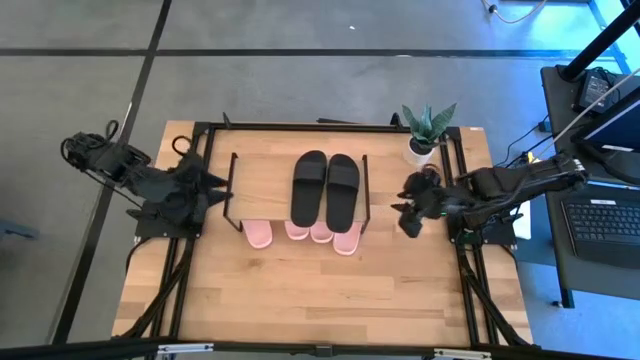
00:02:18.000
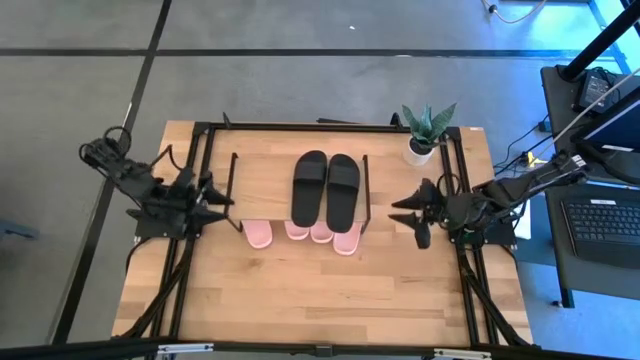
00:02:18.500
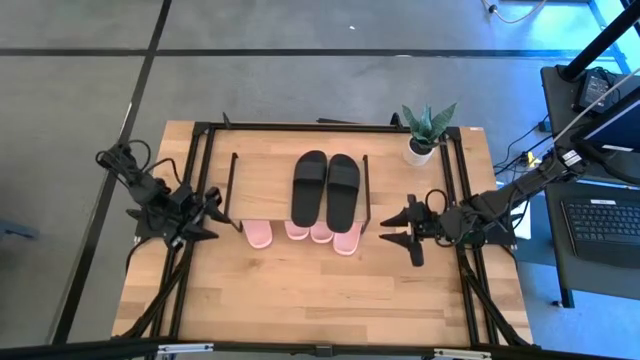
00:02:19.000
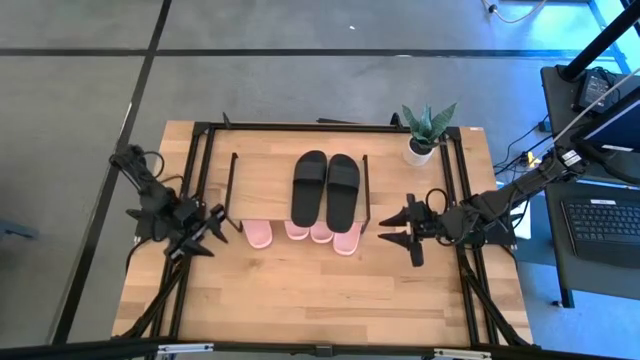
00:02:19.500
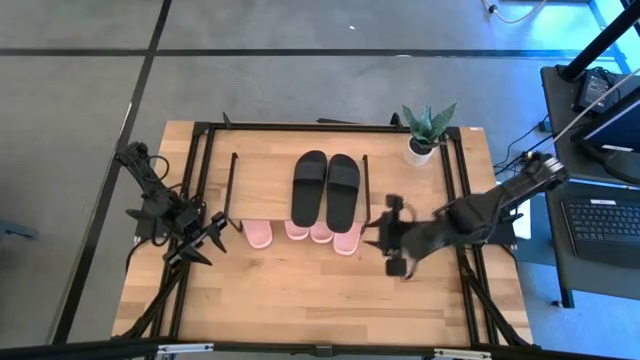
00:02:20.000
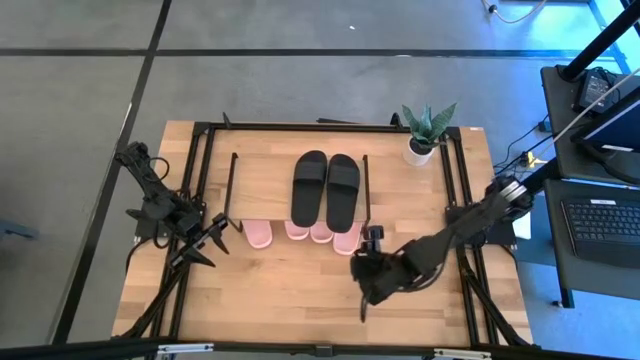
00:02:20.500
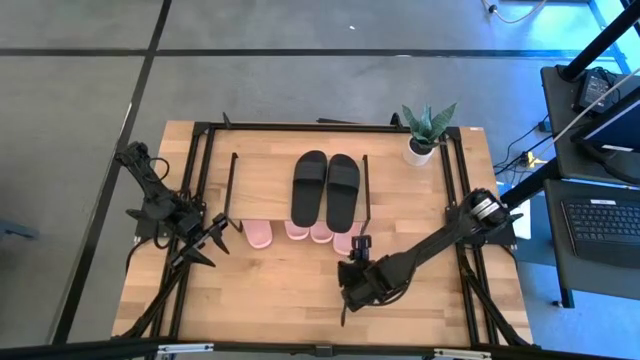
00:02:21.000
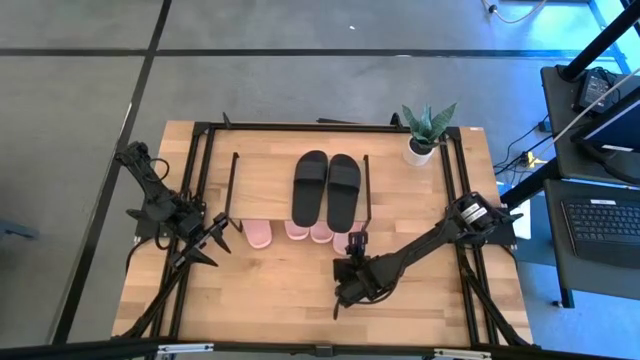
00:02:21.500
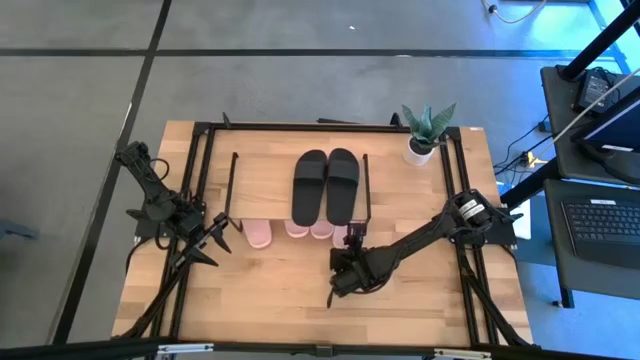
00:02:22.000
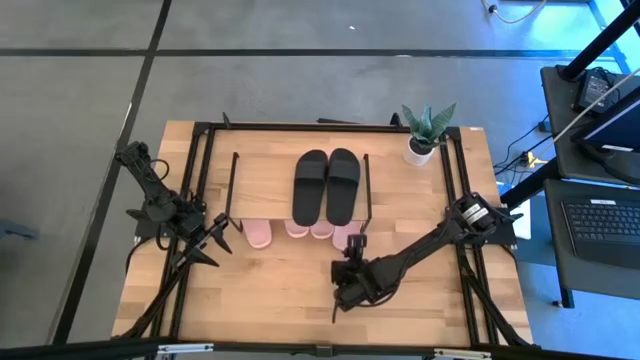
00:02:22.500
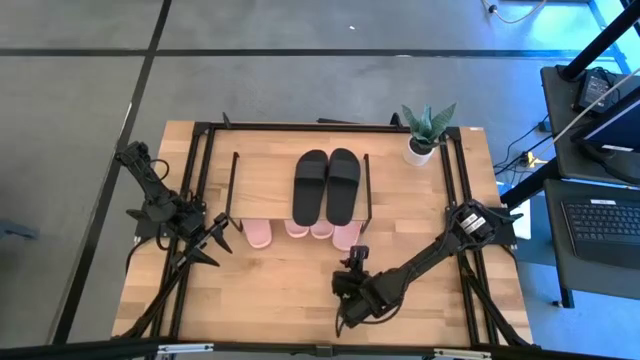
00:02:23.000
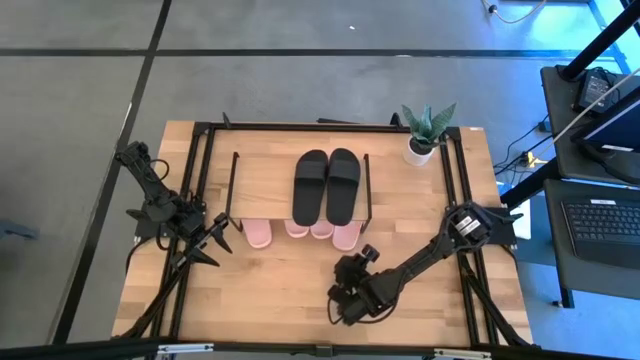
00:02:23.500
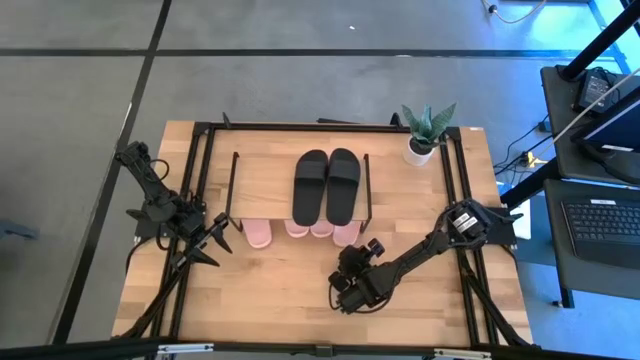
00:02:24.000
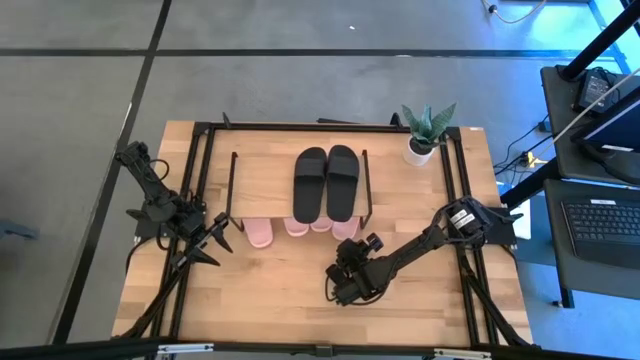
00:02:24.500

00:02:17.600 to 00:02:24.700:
Task: Pick and place slides into the shelf
Adjust the pink slides under the shelf

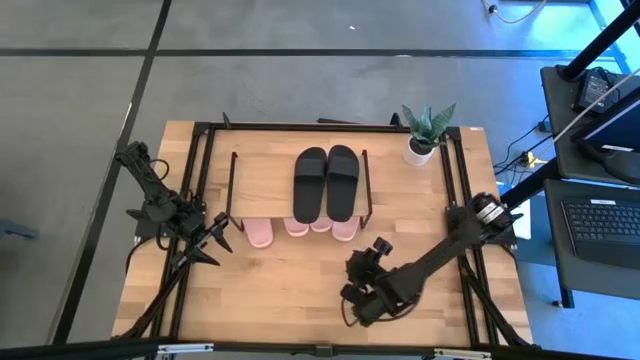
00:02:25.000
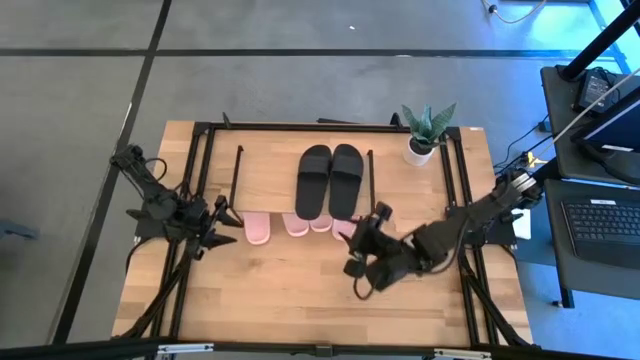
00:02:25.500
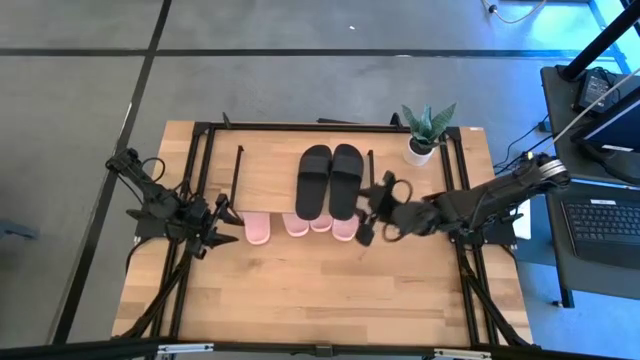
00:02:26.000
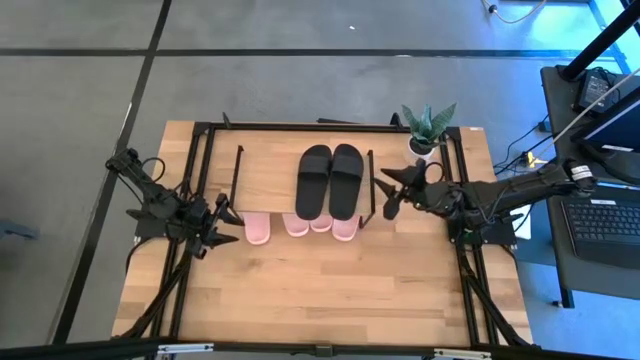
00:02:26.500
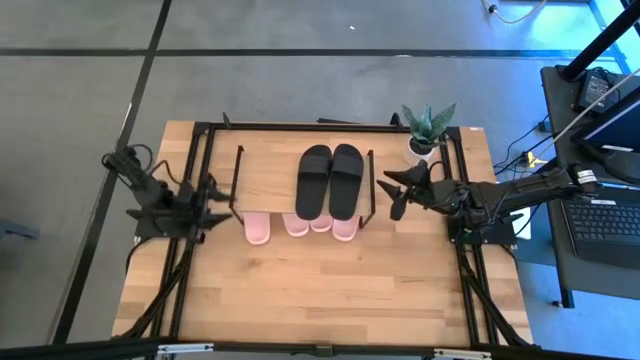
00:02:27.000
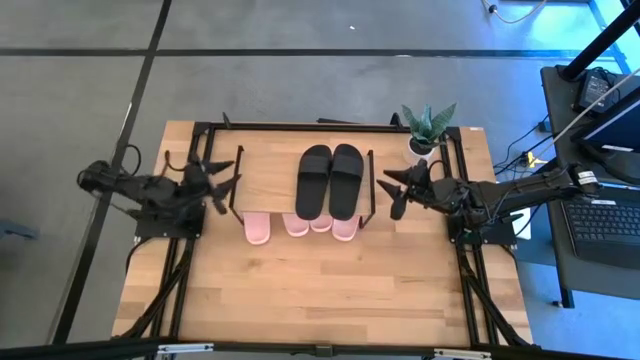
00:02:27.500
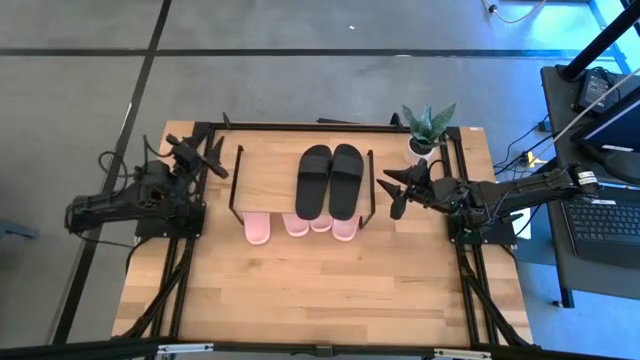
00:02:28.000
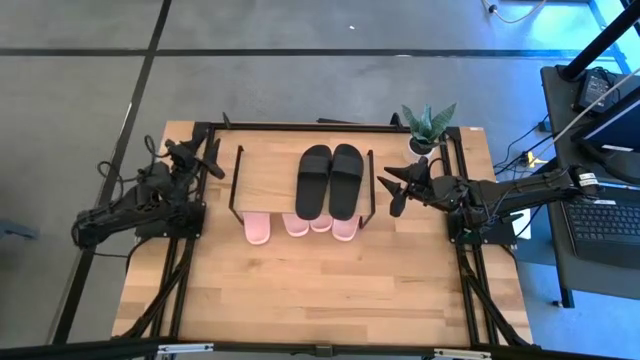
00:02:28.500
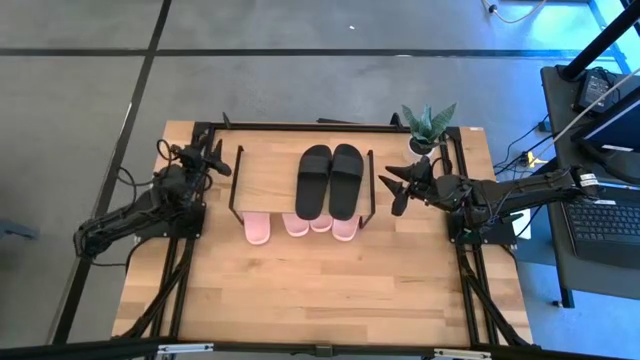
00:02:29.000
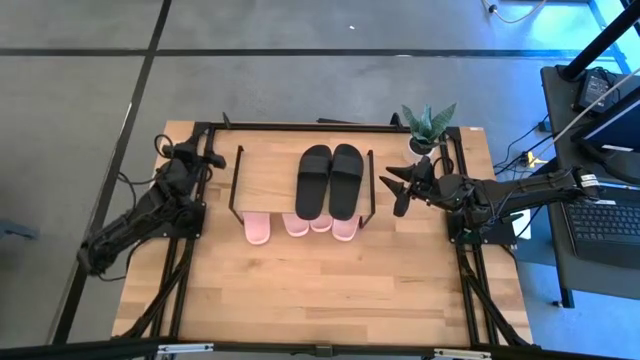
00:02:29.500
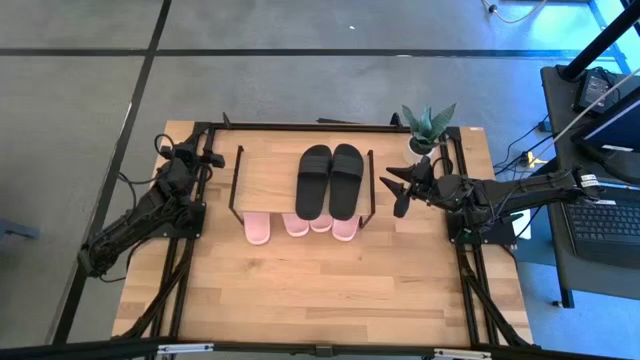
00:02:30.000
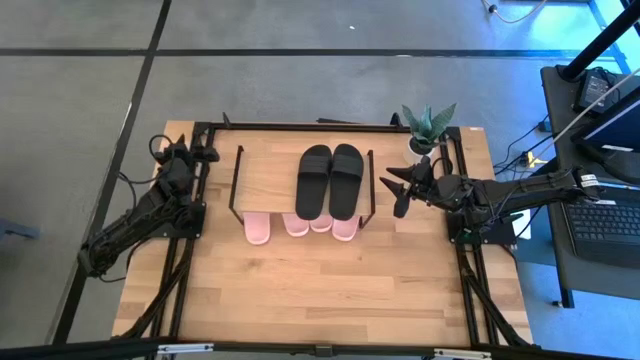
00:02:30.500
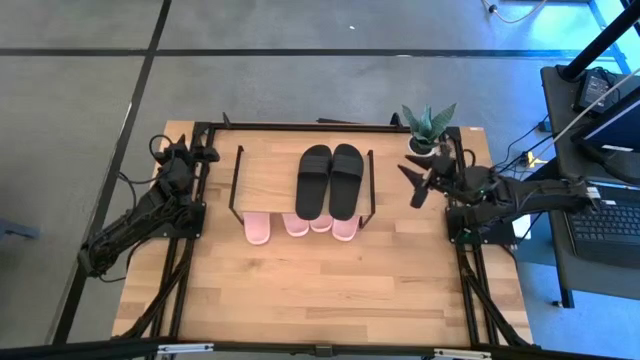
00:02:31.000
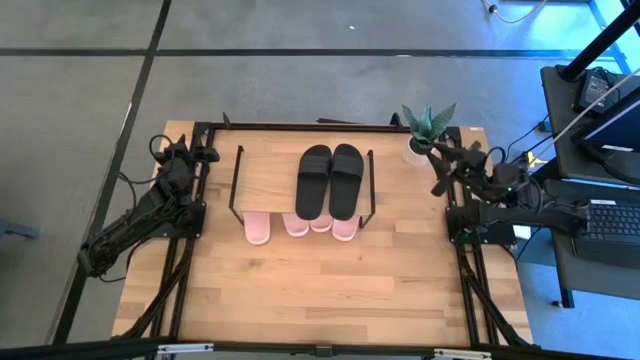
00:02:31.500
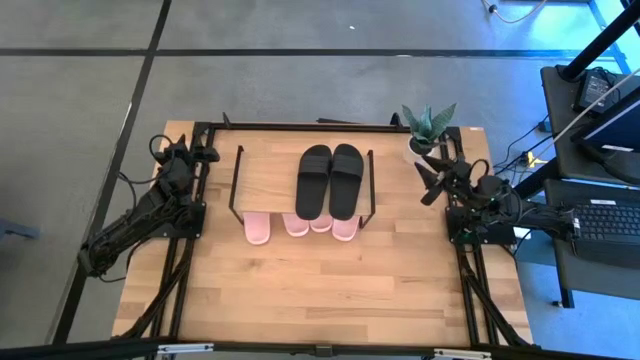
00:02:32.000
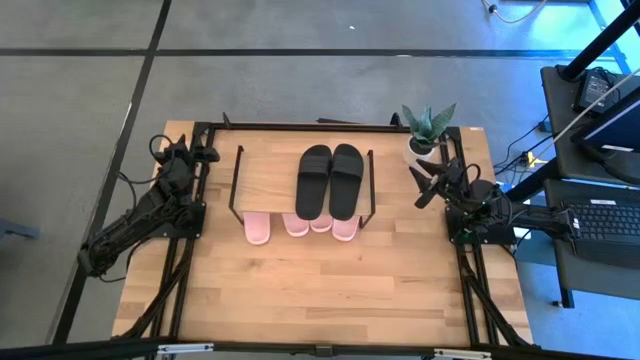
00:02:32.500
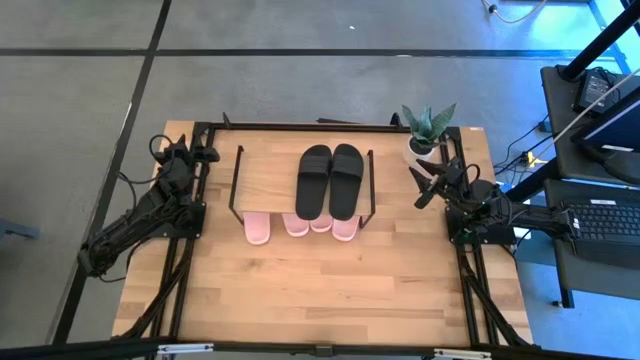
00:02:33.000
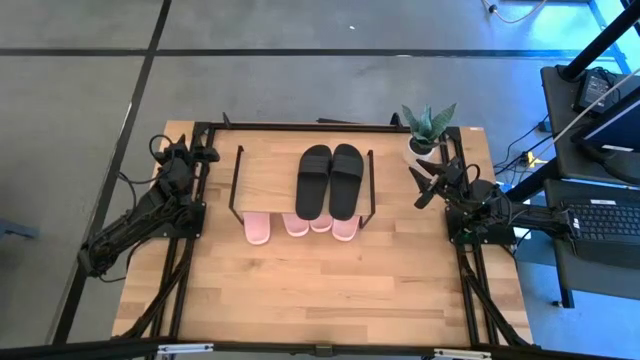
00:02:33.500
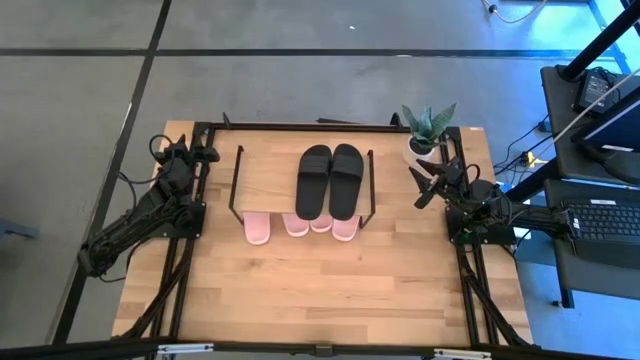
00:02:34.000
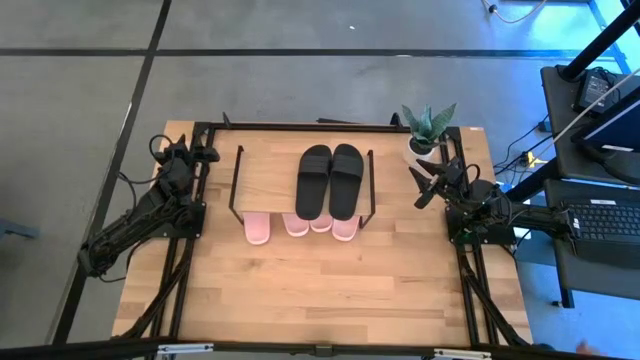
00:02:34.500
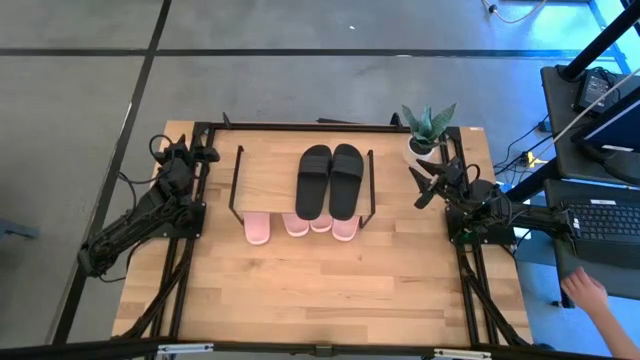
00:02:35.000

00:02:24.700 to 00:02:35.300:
Return to Home Position

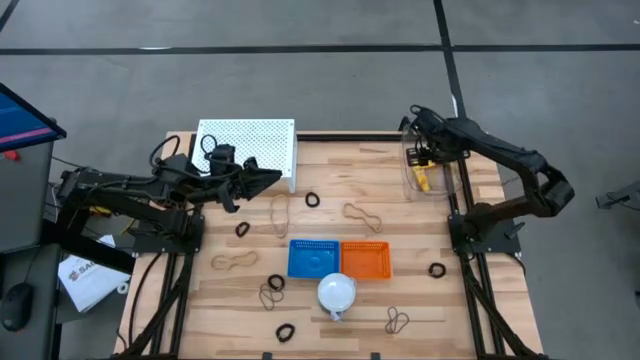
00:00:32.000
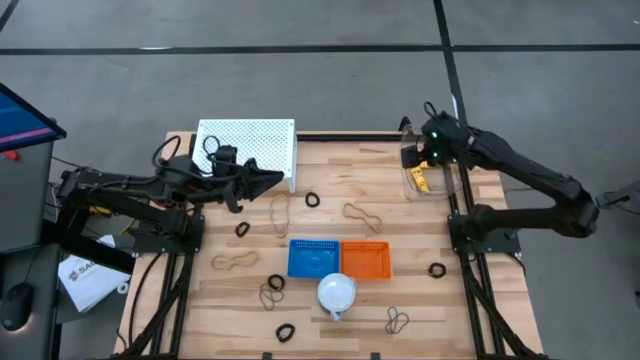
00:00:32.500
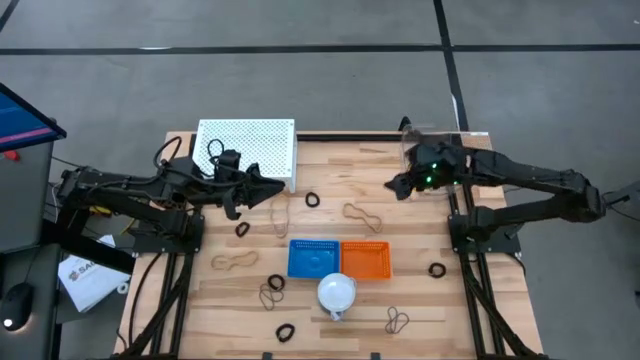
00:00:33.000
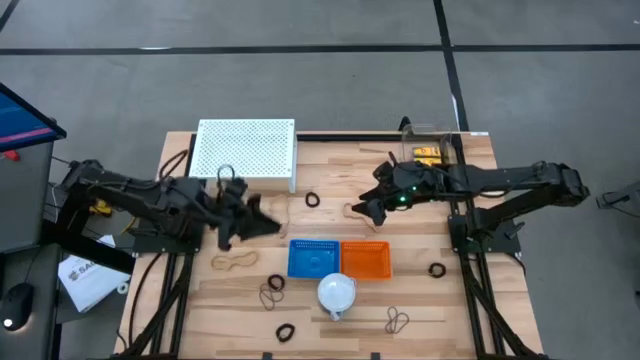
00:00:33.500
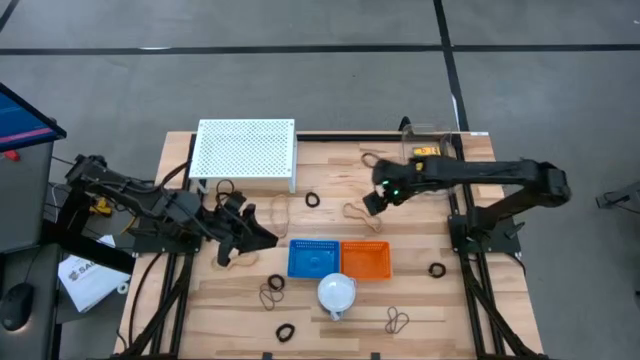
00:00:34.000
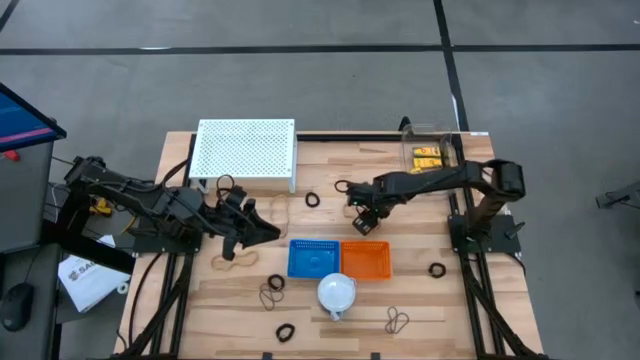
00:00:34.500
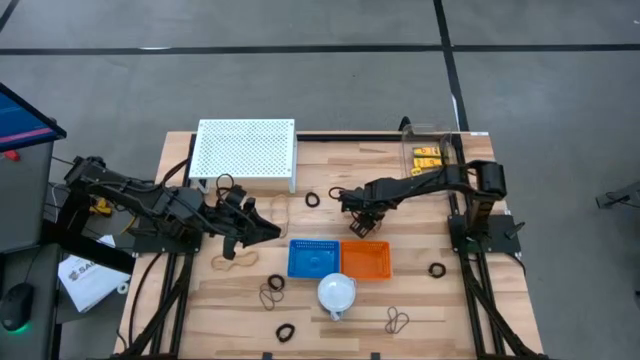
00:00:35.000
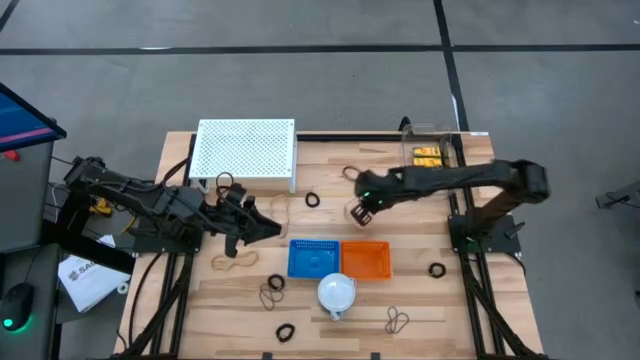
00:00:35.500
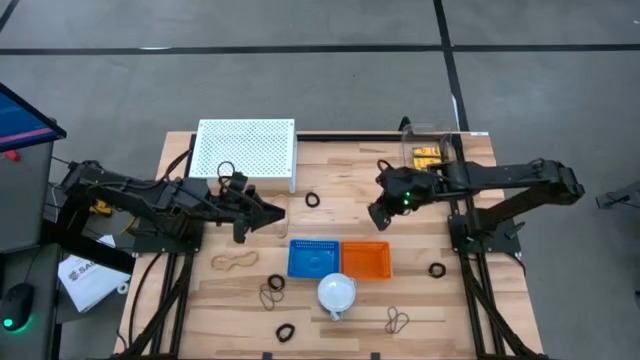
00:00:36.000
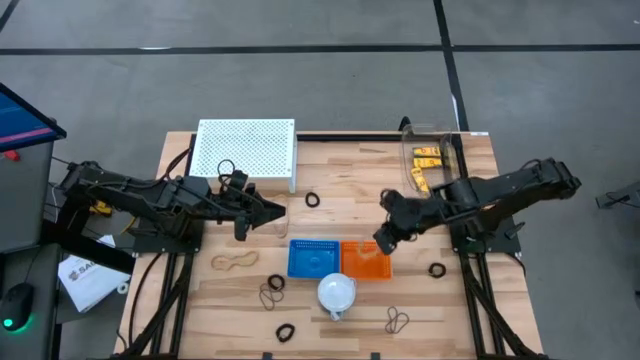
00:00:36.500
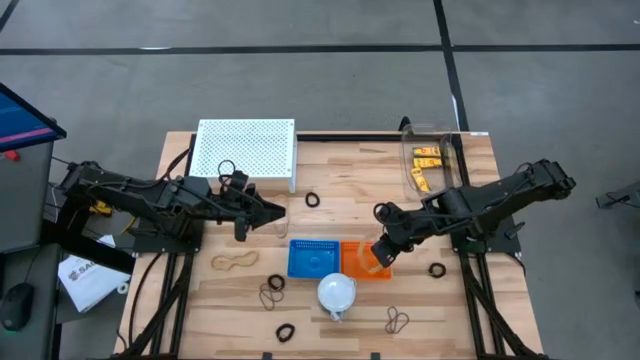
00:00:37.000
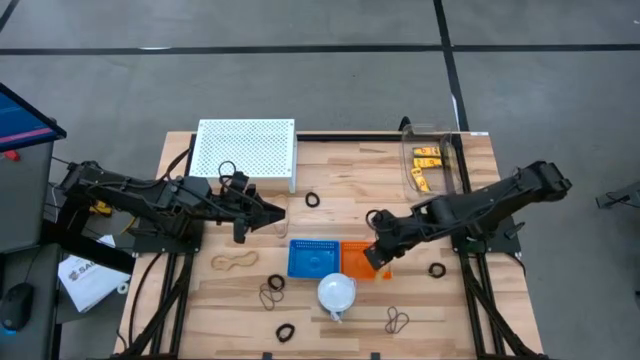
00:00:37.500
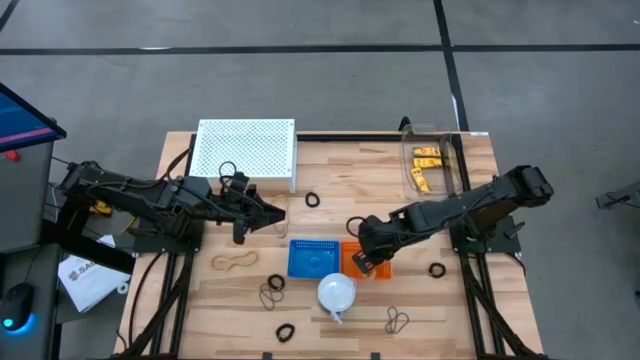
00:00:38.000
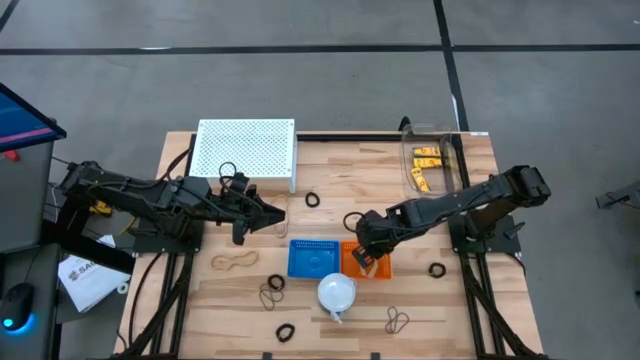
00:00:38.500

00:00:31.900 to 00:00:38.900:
Task: Pick & Place Office Desk Supplies
Put the top right brown rubber band into the orange basket
